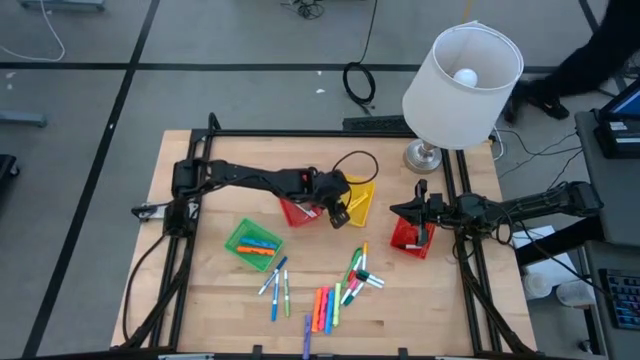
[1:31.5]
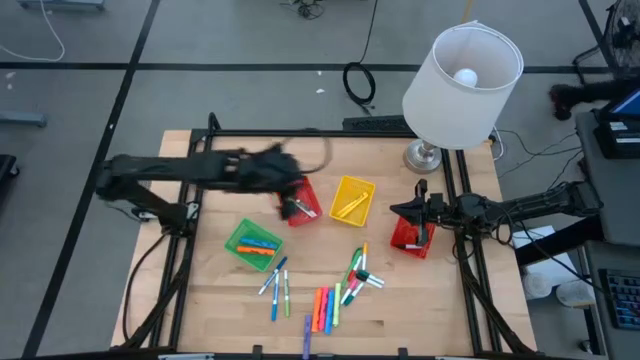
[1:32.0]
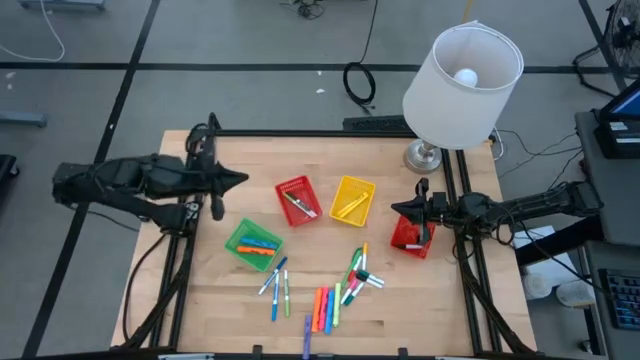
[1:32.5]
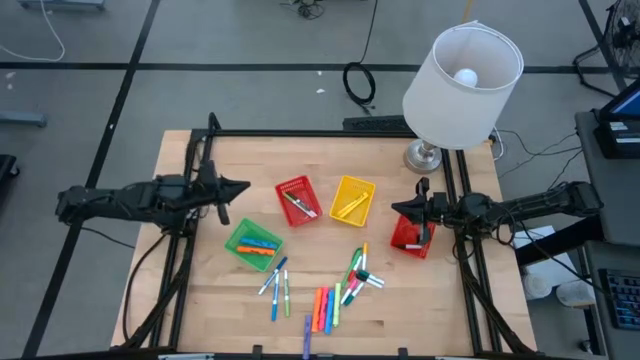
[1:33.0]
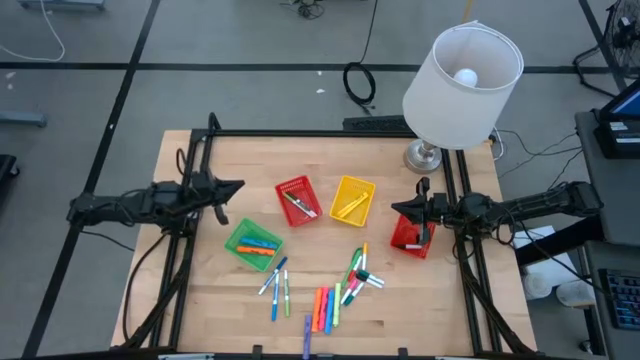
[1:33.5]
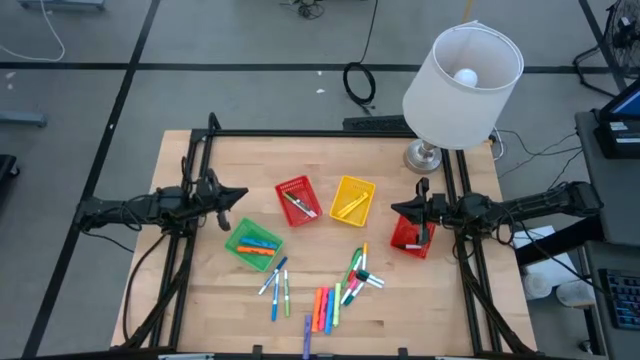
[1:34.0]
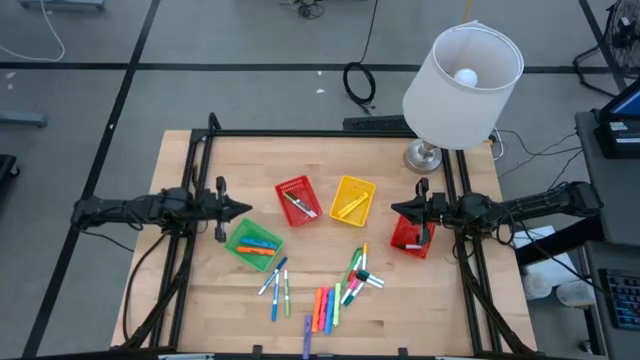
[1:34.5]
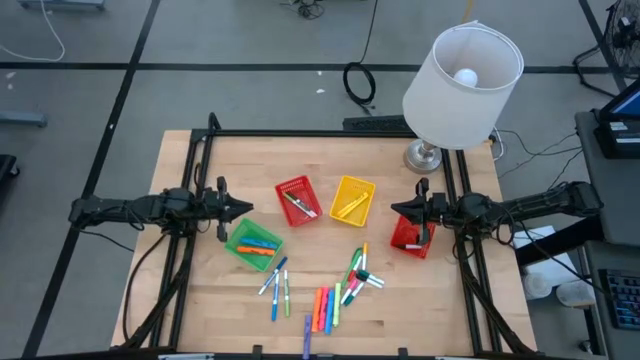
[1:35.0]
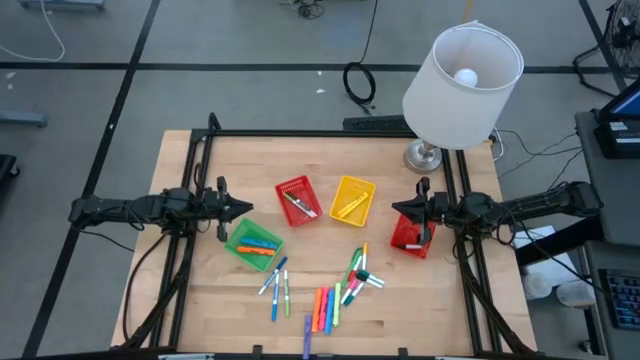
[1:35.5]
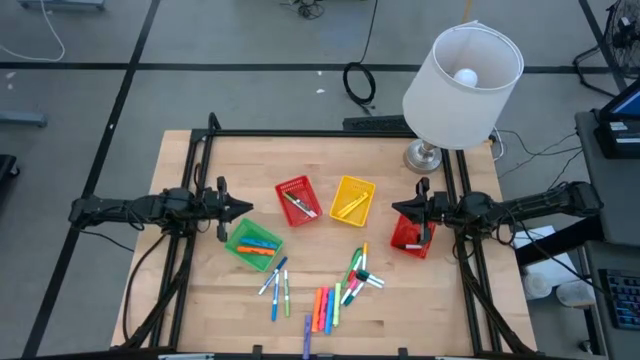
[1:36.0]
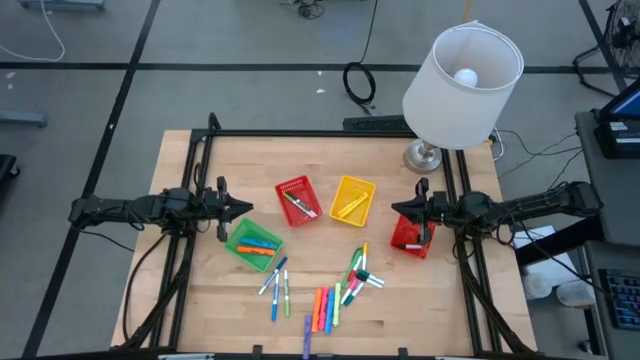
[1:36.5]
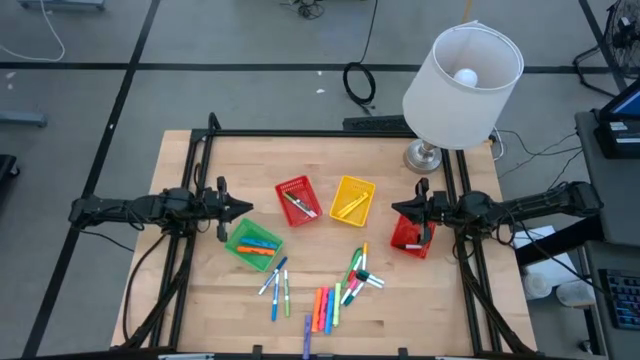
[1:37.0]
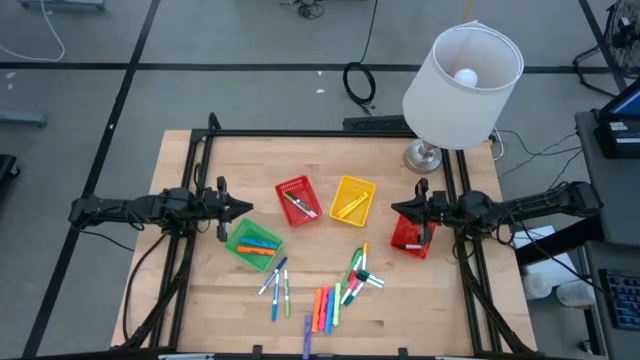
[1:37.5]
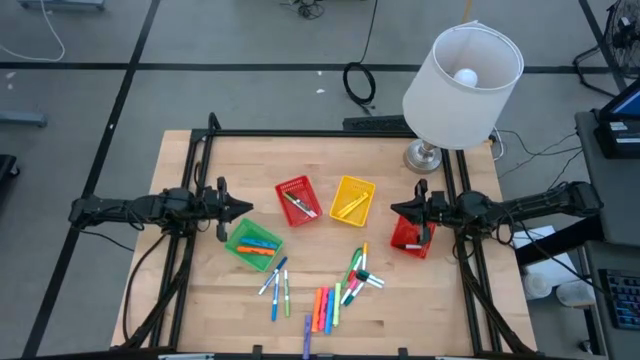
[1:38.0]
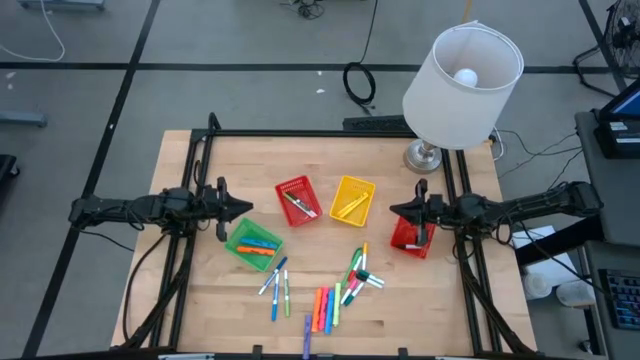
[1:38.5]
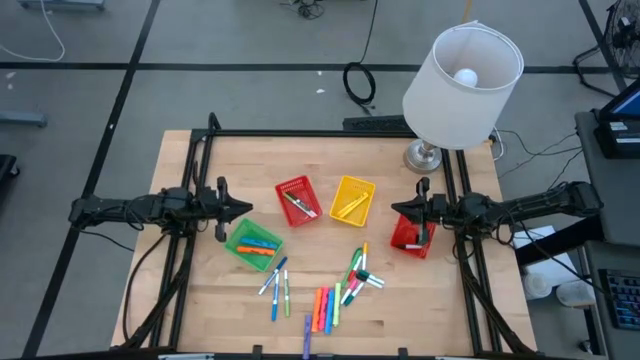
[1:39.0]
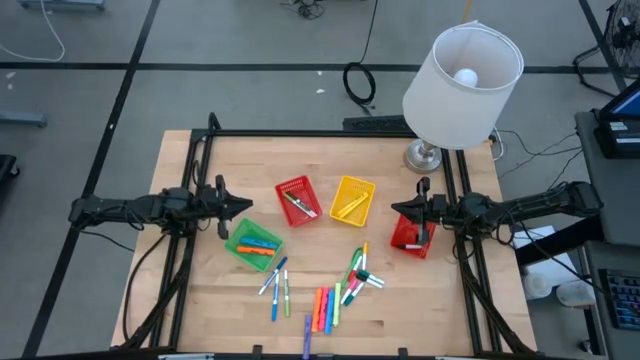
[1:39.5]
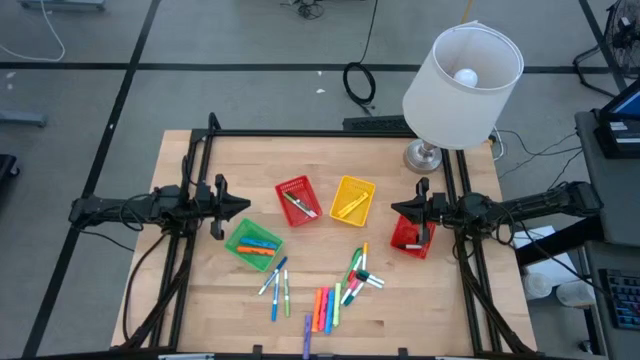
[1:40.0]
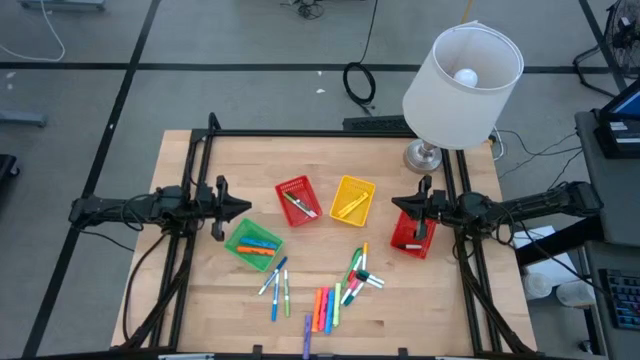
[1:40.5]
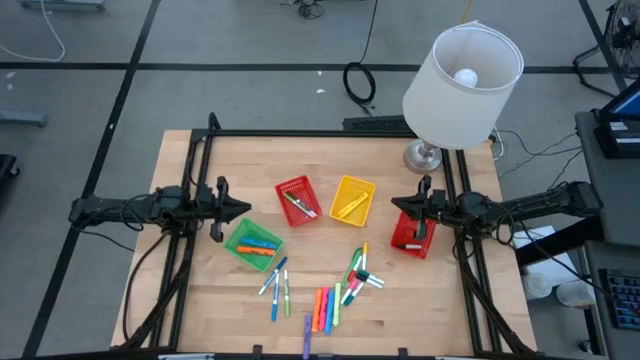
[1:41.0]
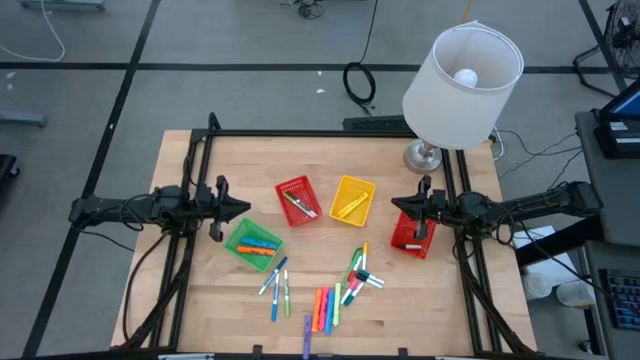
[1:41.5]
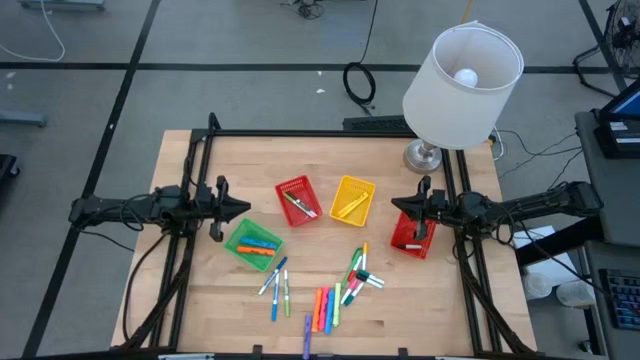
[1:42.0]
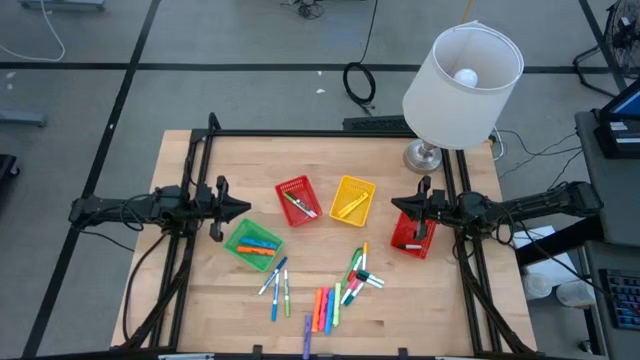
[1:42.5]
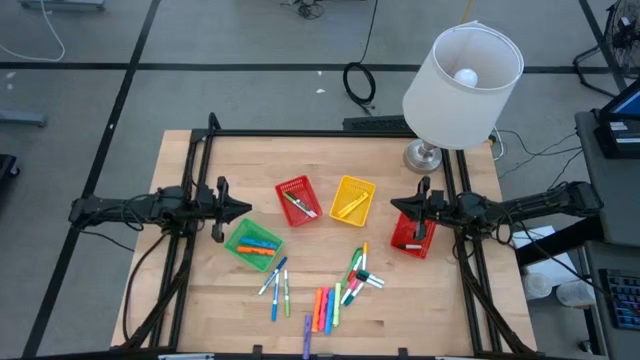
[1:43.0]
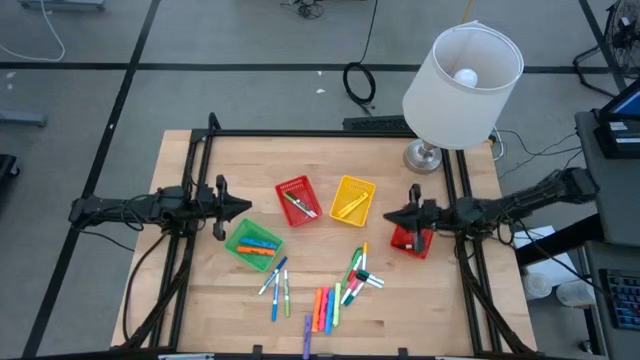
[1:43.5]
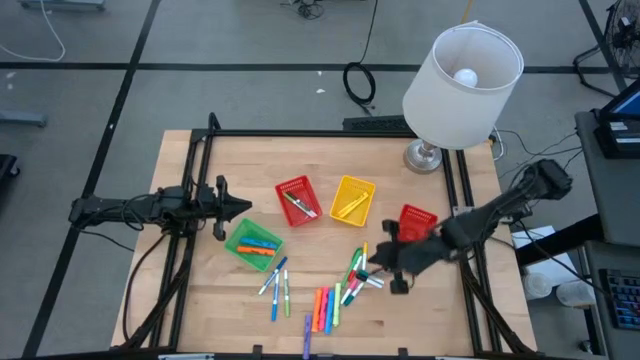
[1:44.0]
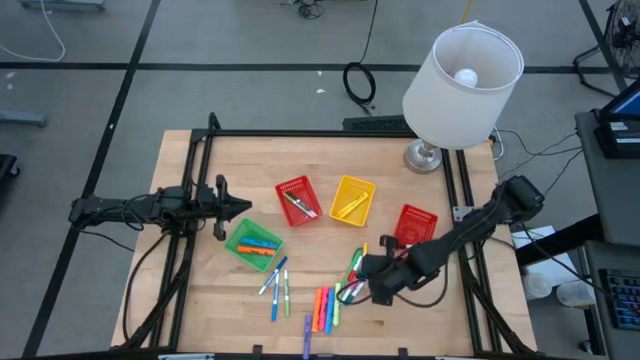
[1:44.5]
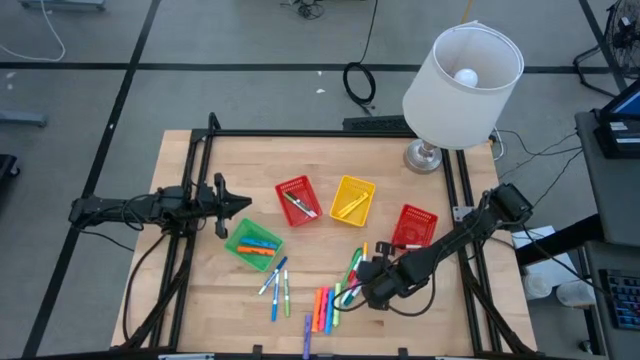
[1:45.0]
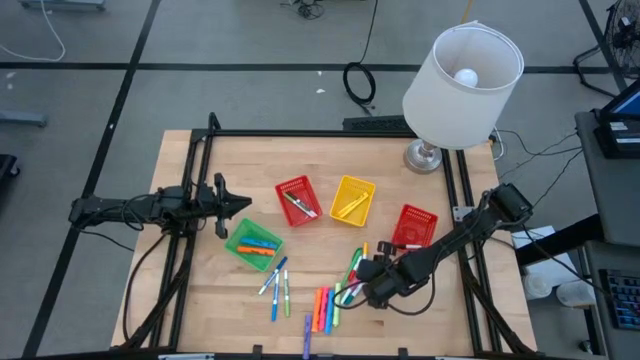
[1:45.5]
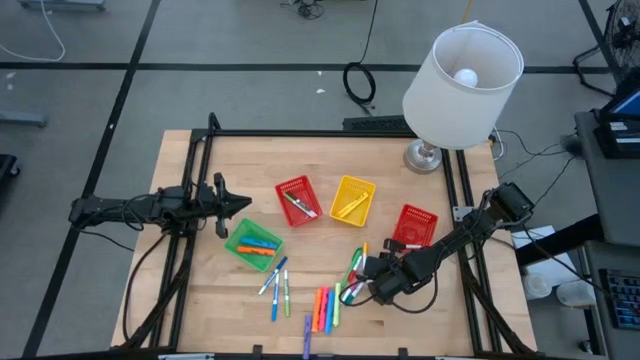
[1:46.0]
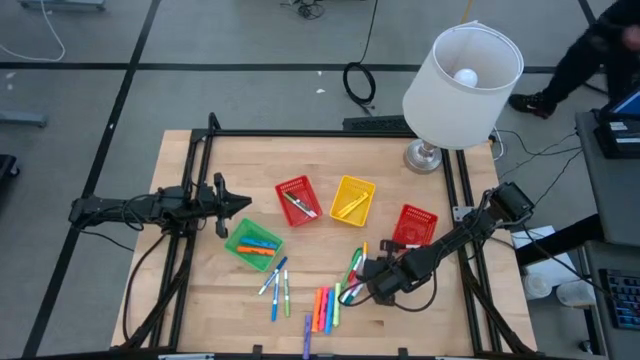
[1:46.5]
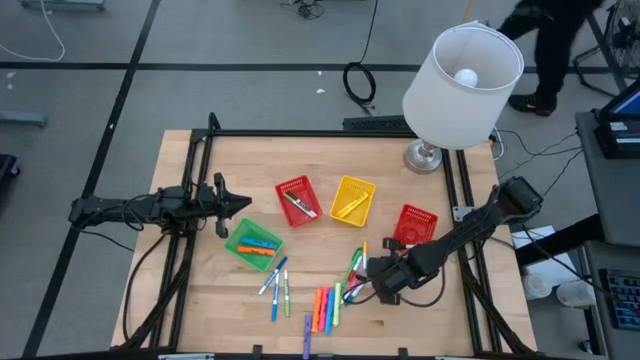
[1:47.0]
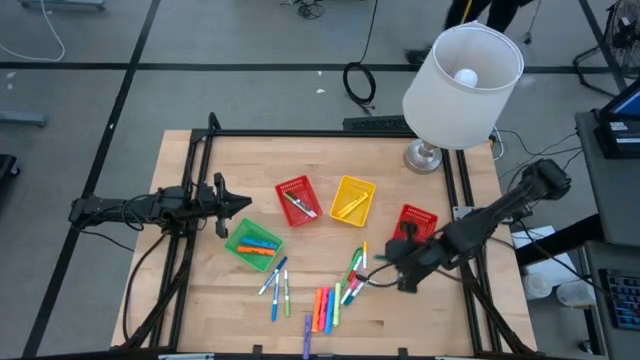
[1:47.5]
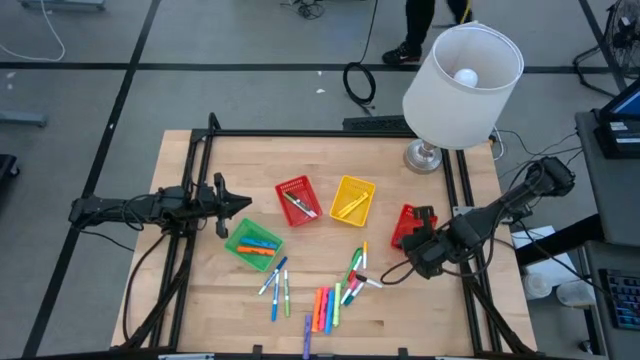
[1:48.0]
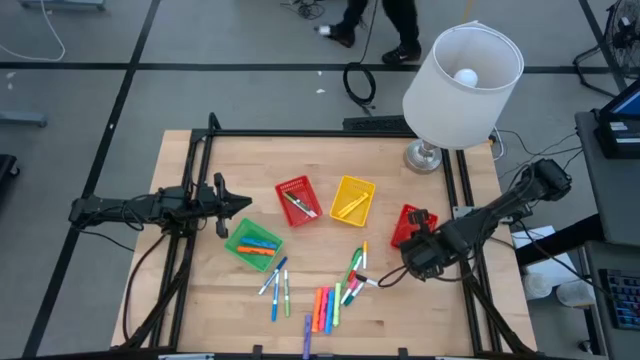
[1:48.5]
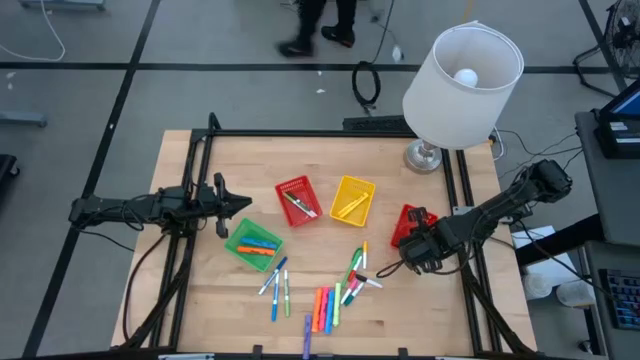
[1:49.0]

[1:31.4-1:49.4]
Task: Pick & Place Markers
Put the top green marker into the right red bin

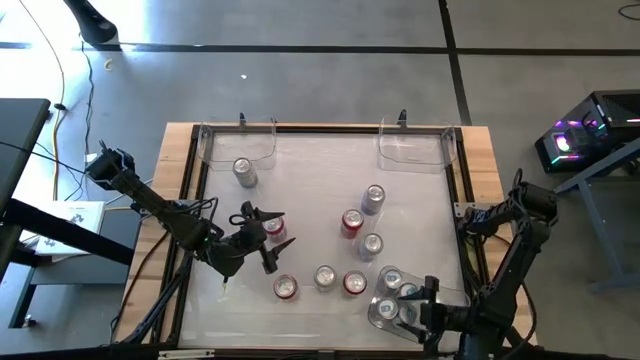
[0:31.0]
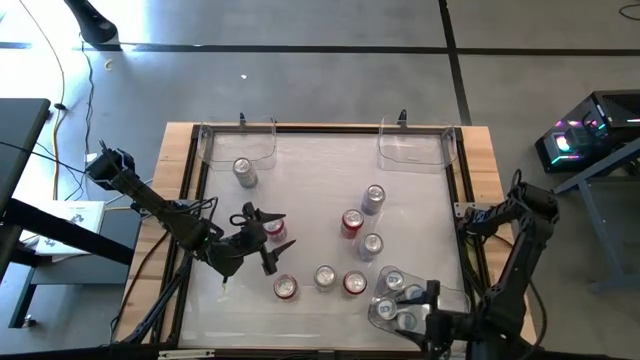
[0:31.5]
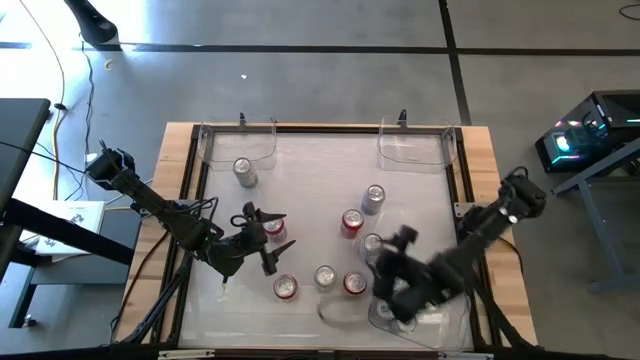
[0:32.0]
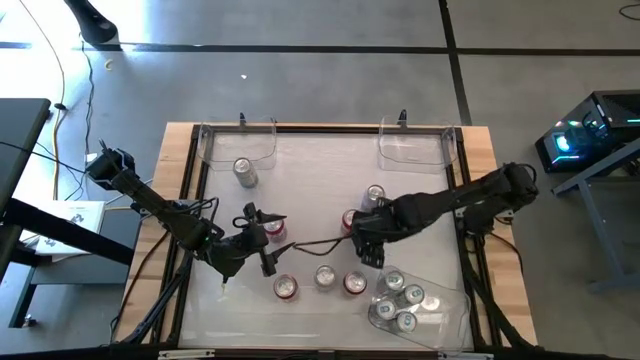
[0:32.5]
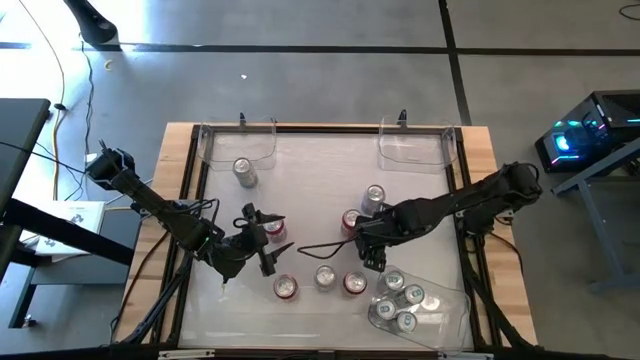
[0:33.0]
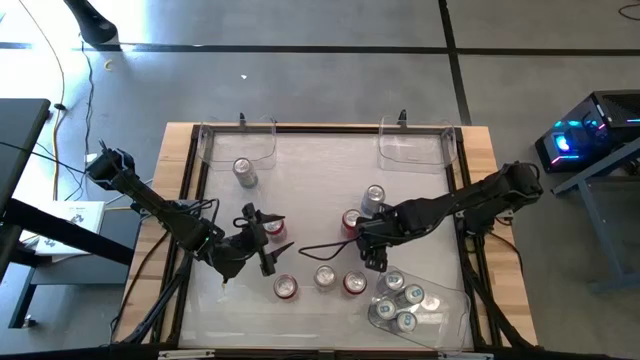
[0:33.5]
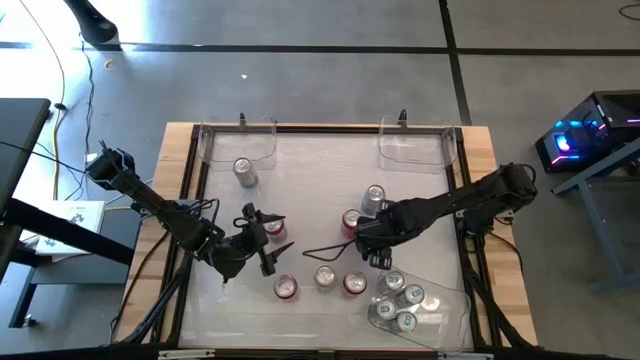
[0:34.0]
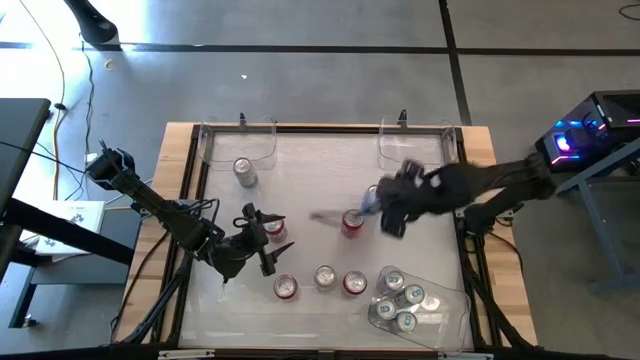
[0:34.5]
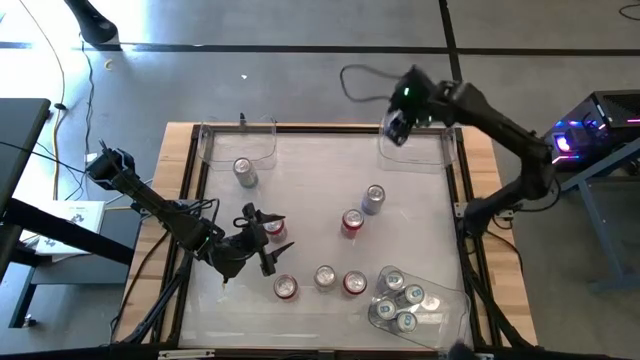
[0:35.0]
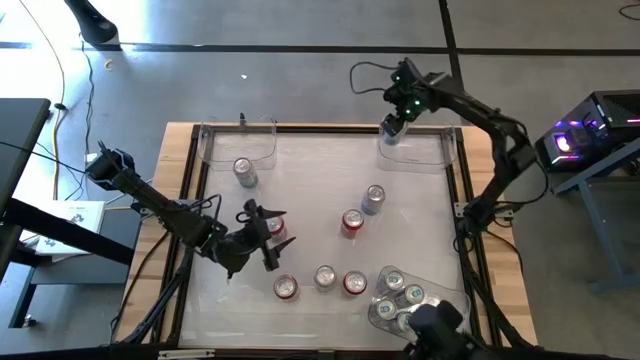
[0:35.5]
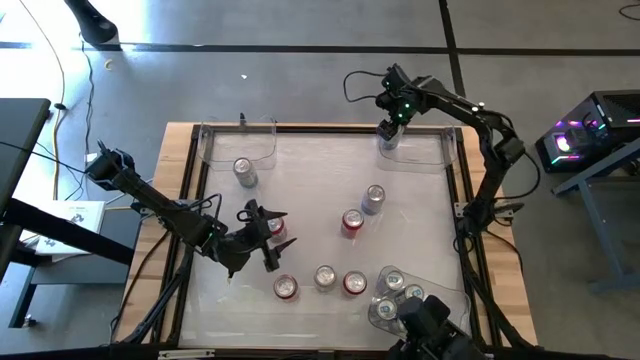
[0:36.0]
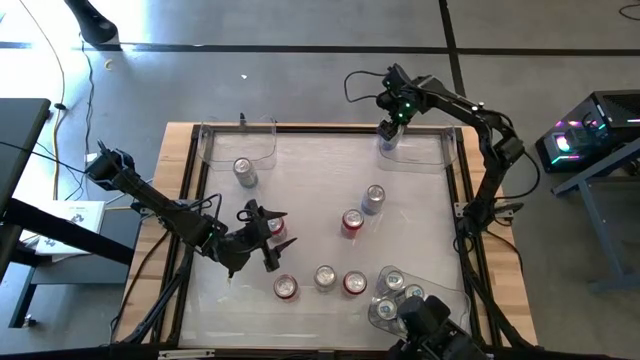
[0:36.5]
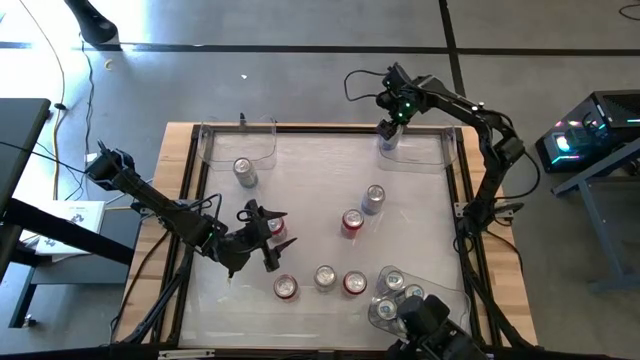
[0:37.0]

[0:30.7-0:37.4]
Task: Sort soda cans
Put the blue white soda can into the top right transparent bin
